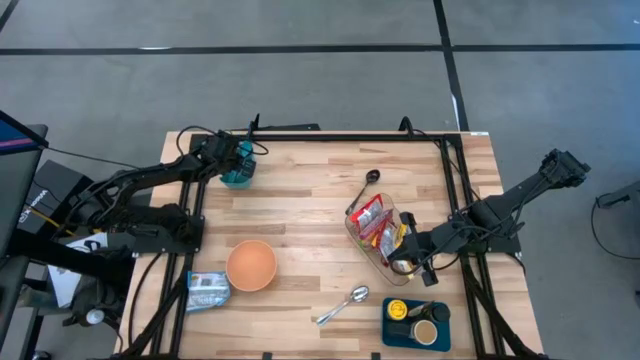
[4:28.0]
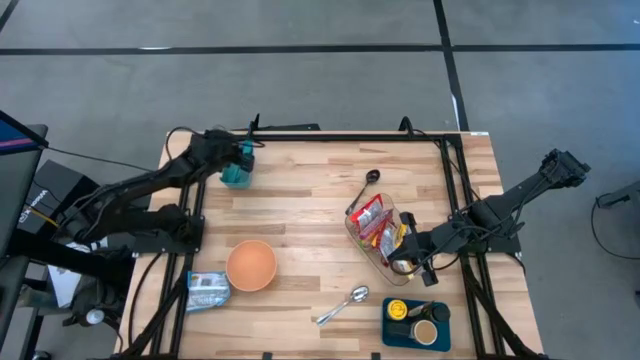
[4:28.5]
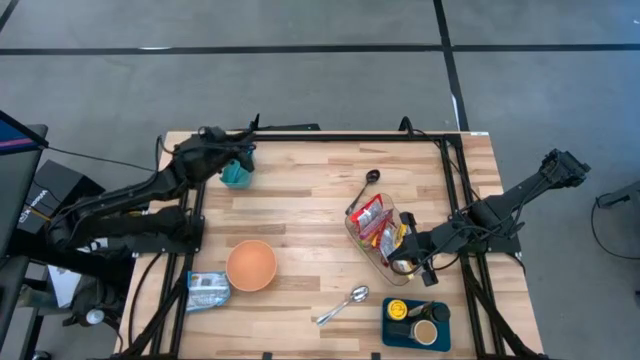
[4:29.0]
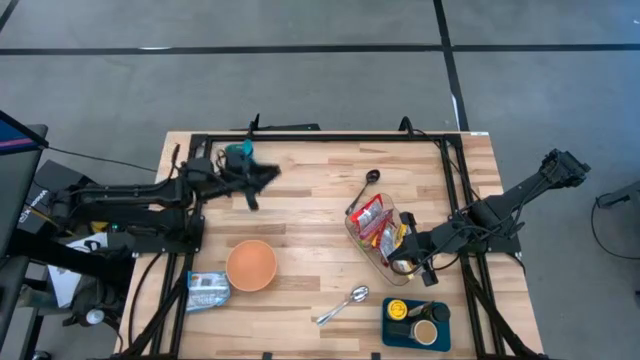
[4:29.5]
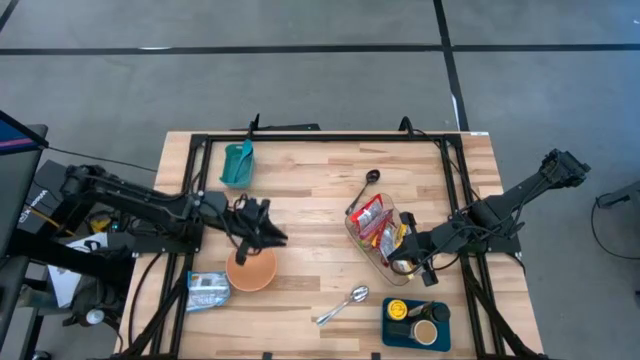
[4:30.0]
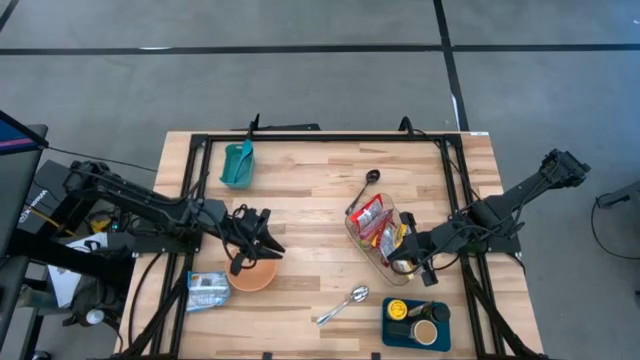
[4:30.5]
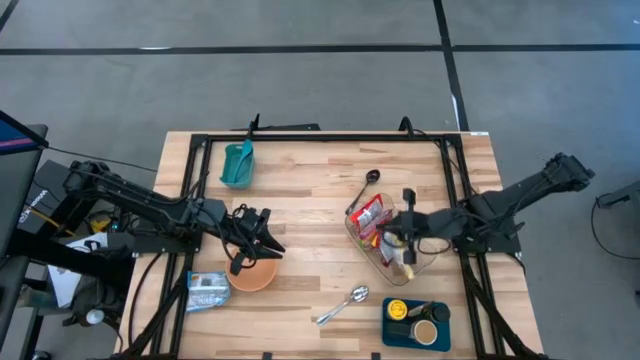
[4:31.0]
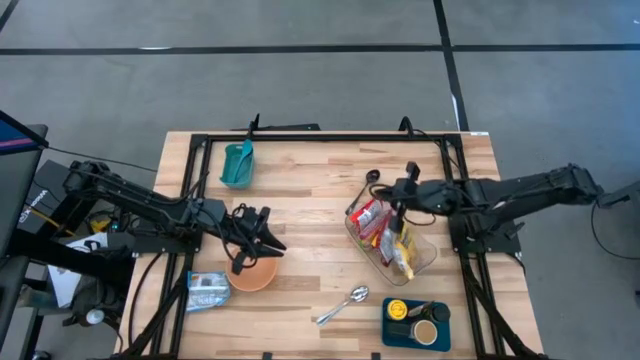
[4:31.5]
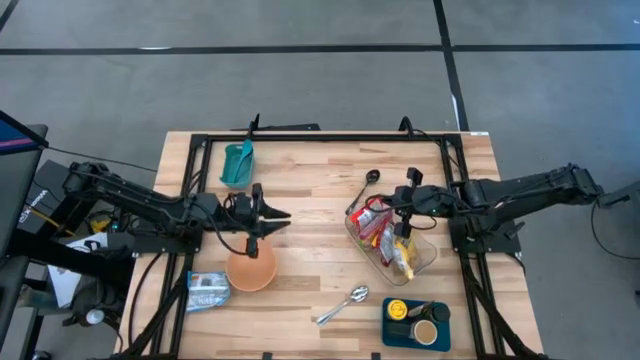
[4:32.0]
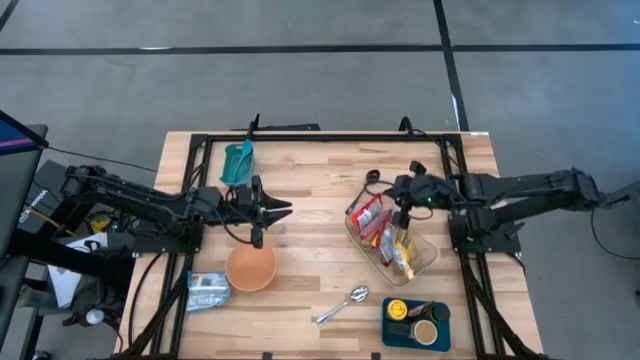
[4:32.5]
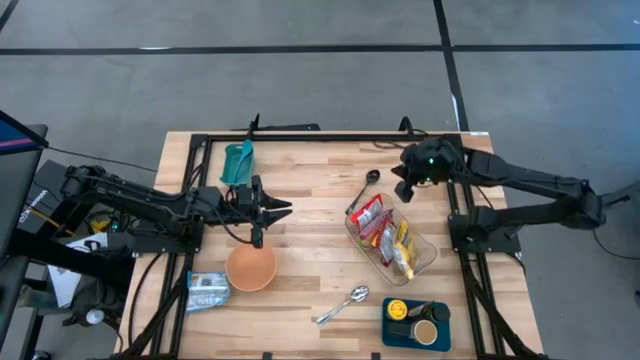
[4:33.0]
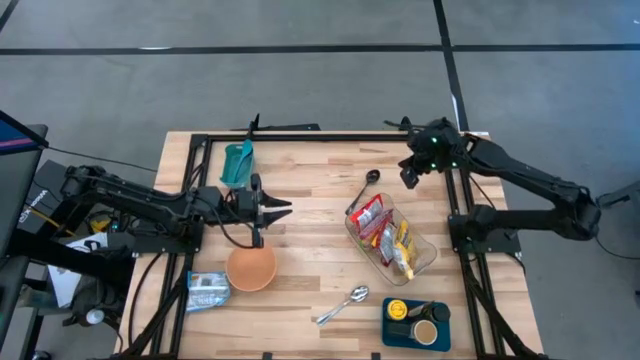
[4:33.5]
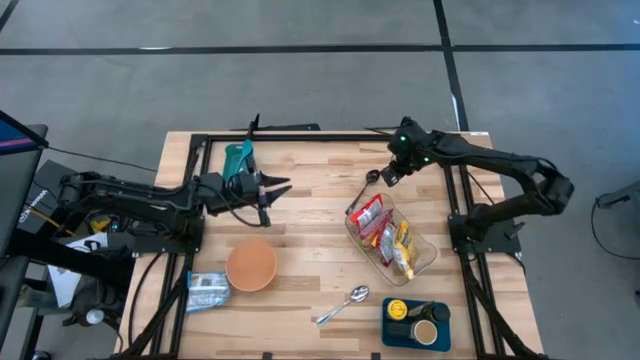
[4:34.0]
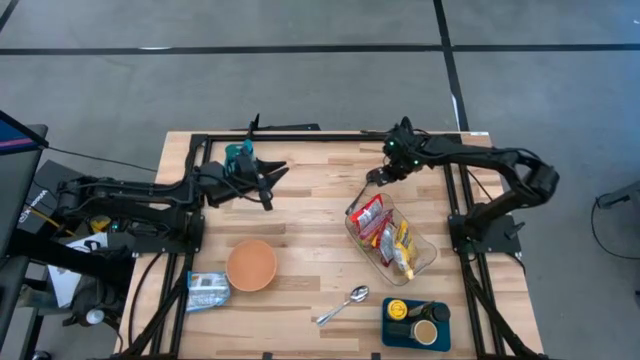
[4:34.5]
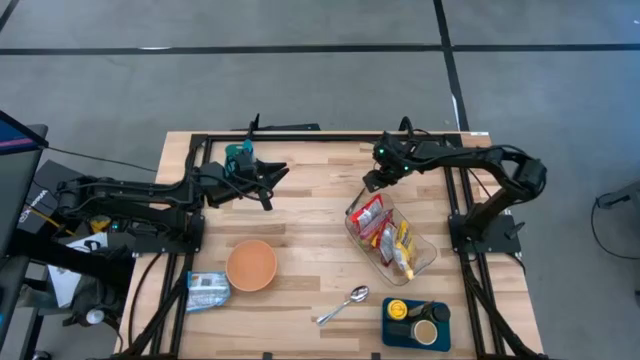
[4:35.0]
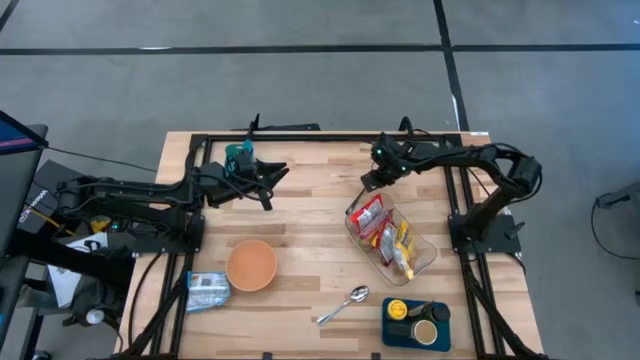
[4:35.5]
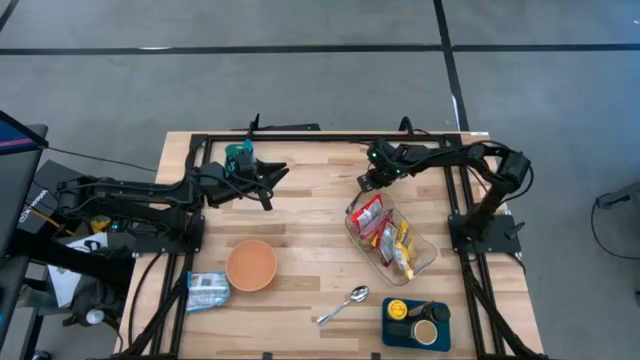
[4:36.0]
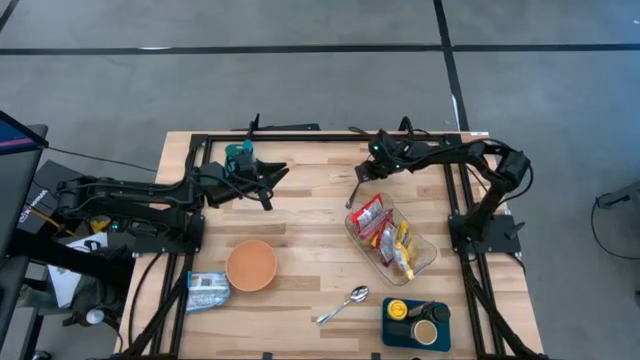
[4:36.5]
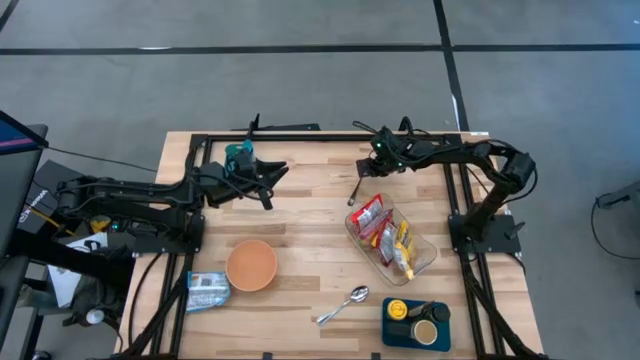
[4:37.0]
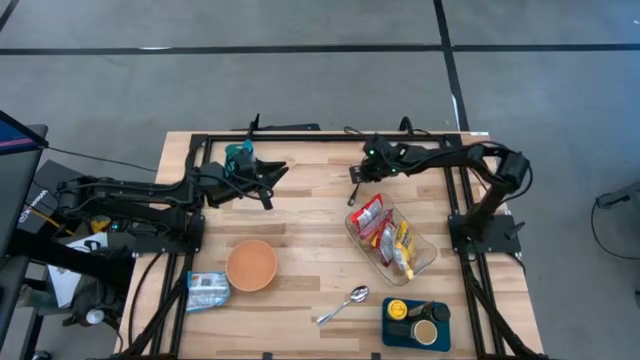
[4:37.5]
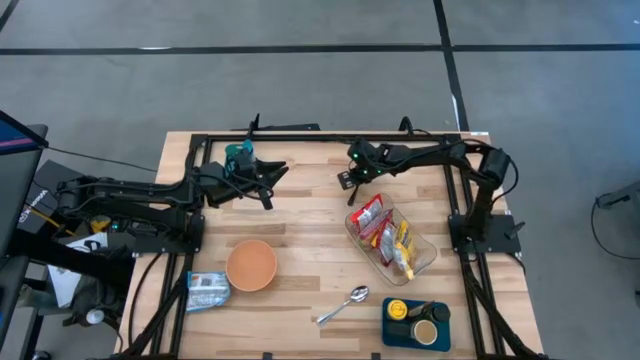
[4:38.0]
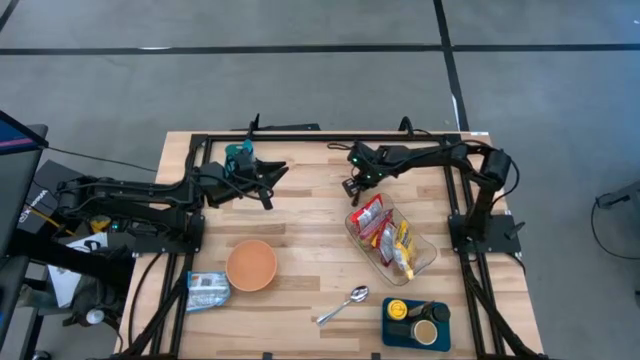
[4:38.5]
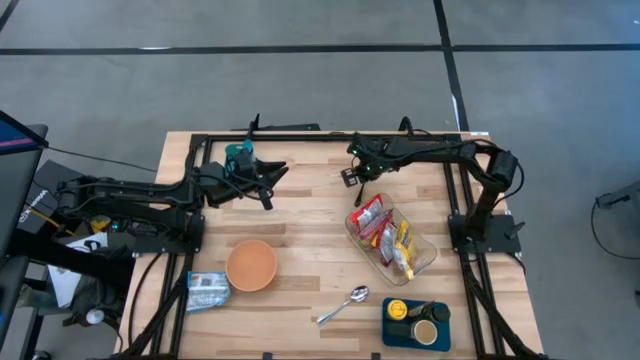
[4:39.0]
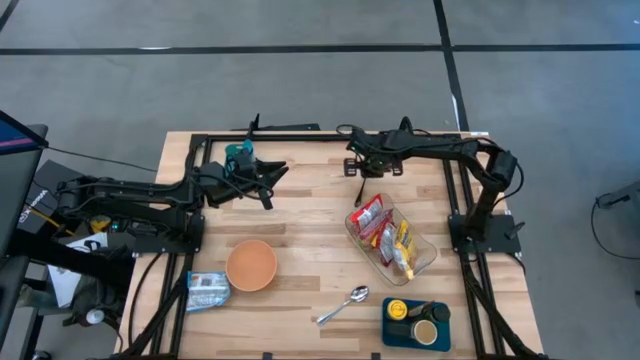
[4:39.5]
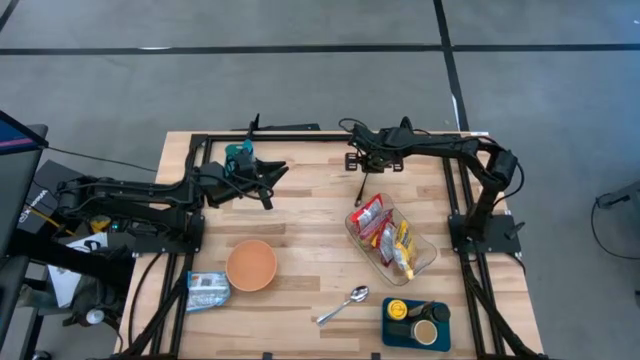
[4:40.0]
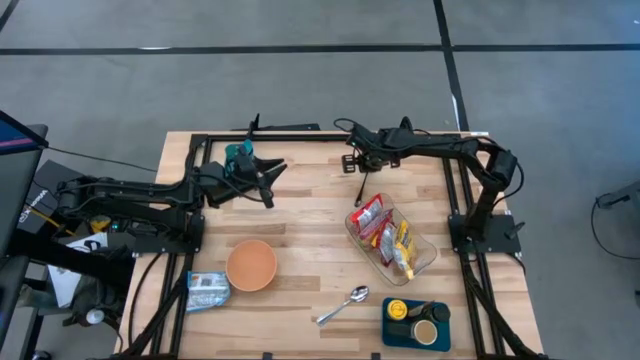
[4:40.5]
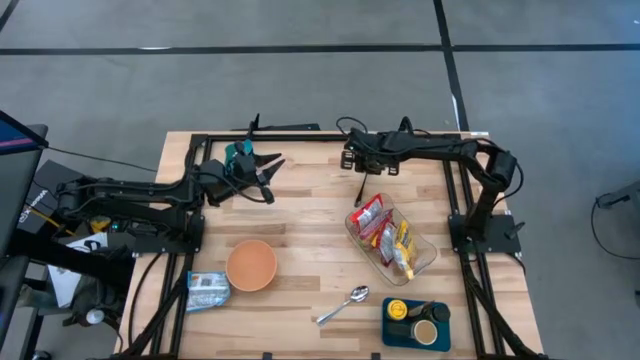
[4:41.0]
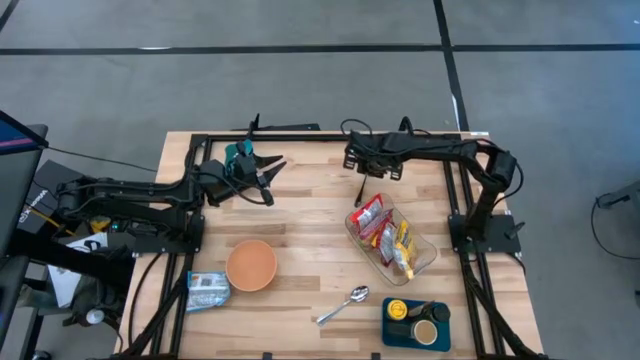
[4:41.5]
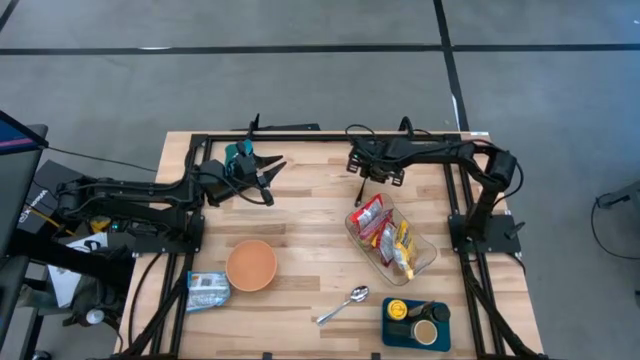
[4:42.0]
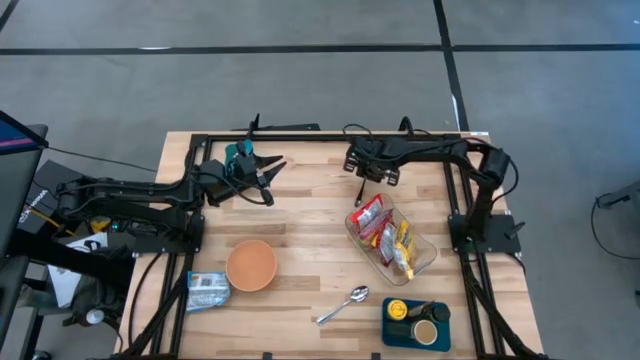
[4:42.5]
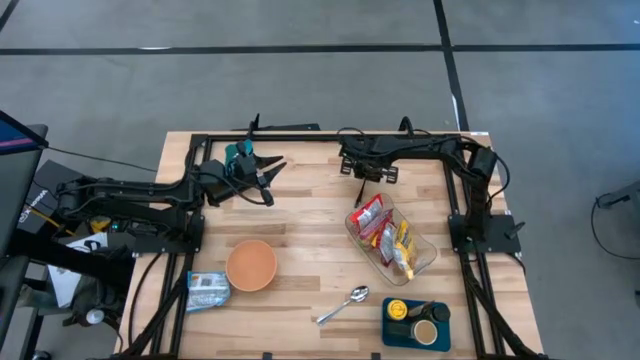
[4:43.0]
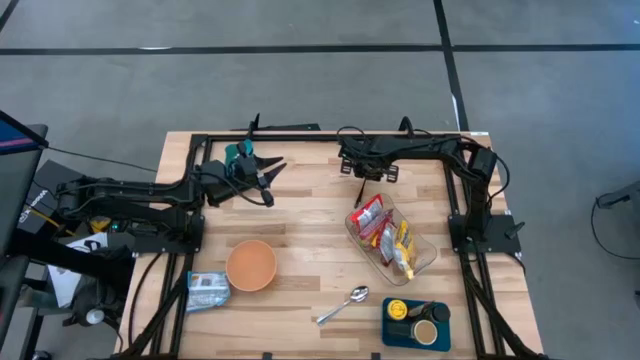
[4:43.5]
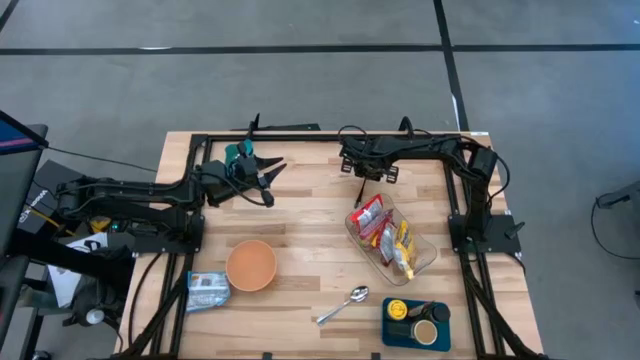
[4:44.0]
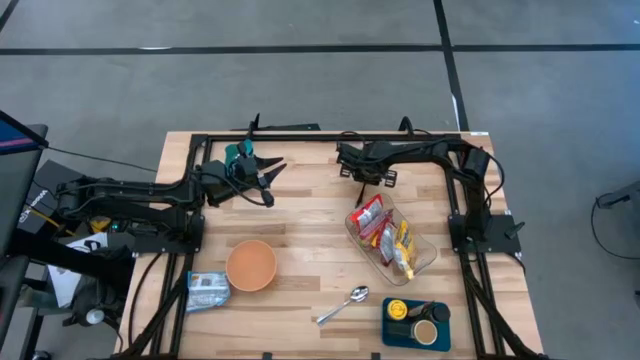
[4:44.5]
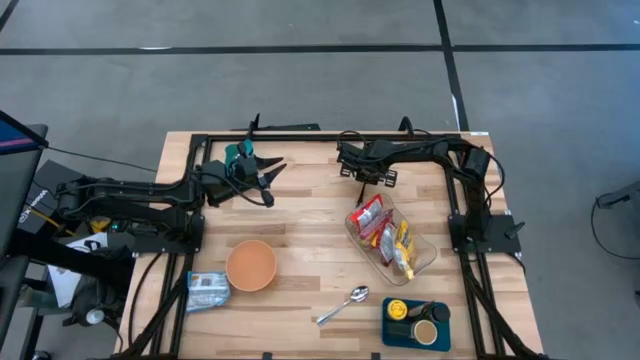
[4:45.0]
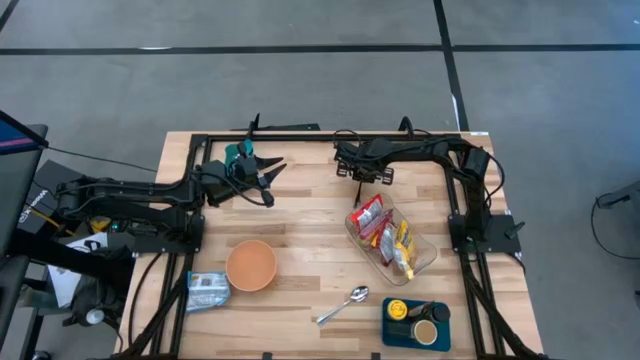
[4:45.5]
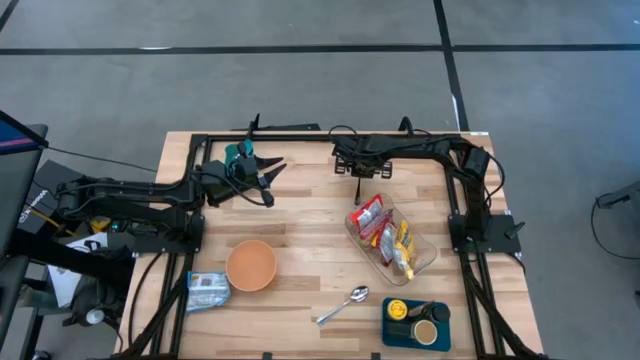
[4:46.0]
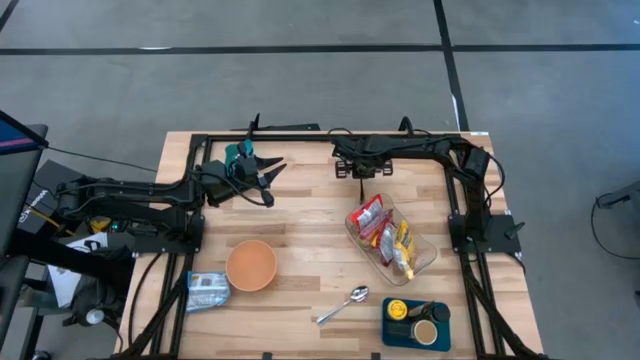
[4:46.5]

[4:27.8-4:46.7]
Task: Pick & Place Food Item
Put the black spoon into the green bin

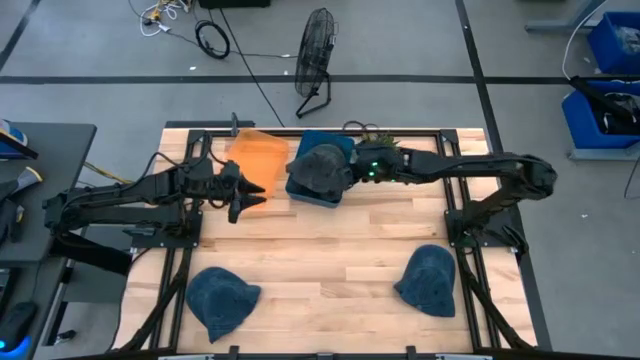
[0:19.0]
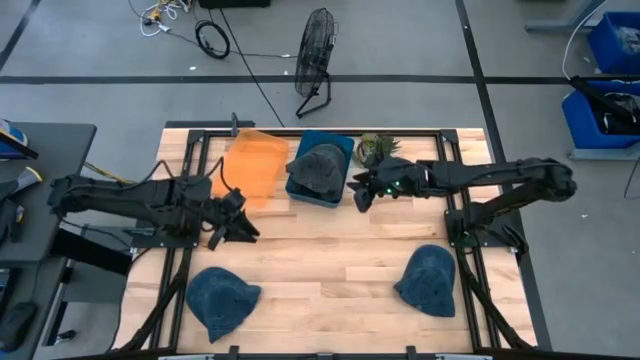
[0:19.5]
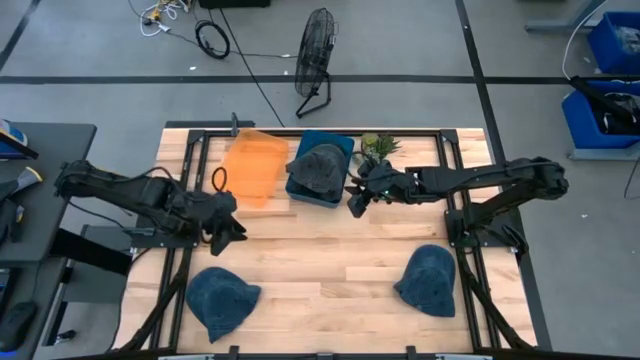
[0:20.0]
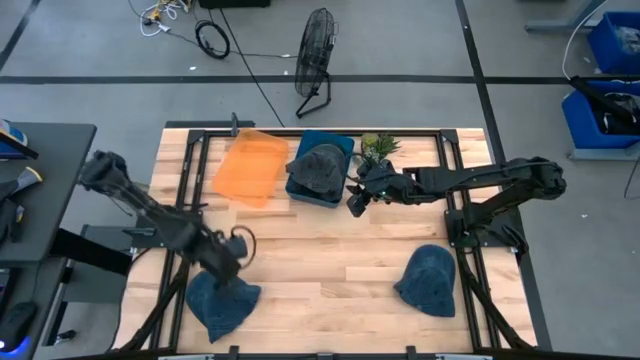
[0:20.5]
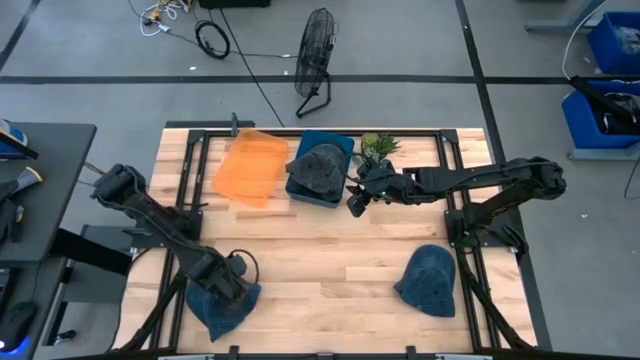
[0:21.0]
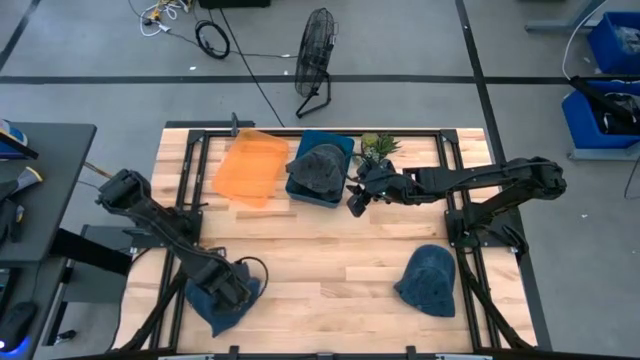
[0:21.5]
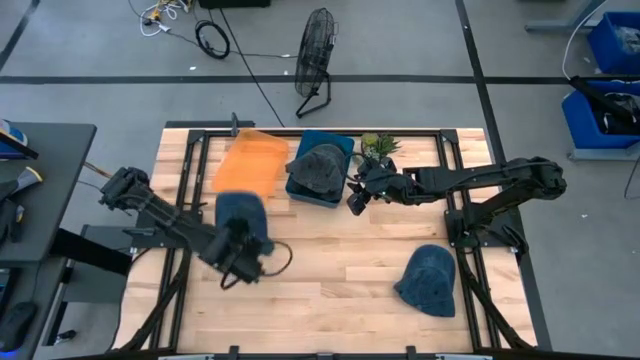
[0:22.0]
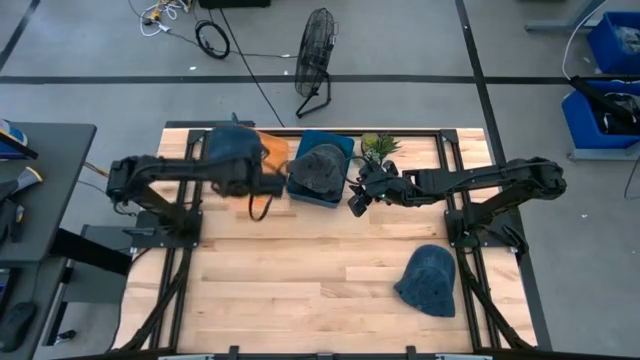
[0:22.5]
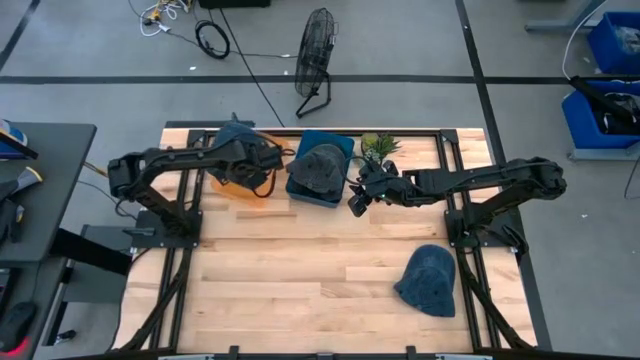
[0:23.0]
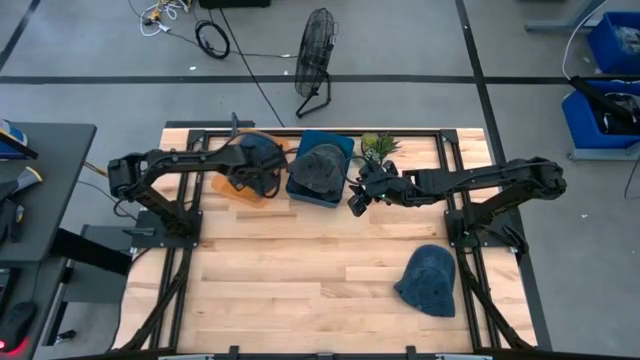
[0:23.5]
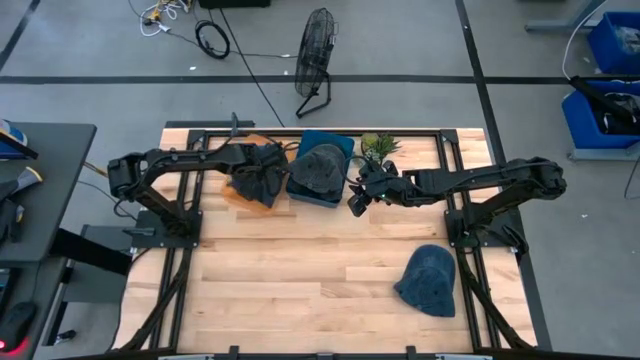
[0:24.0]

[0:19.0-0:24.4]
Task: Pick & Place hat
Put the left blue cap into the orange bin
